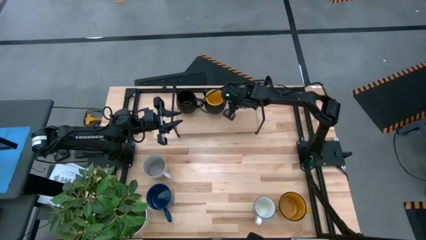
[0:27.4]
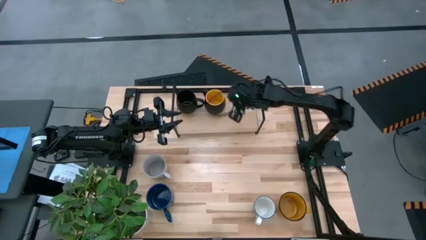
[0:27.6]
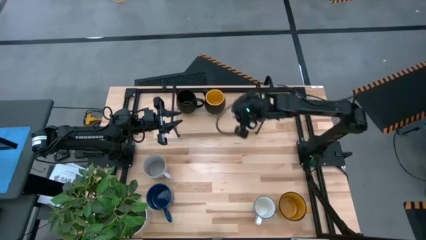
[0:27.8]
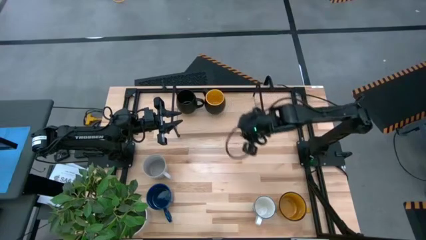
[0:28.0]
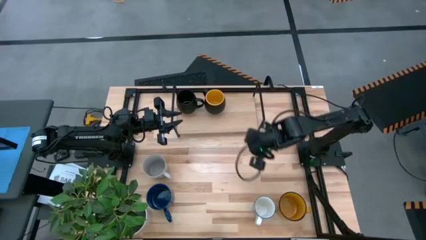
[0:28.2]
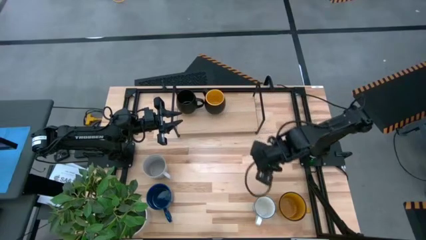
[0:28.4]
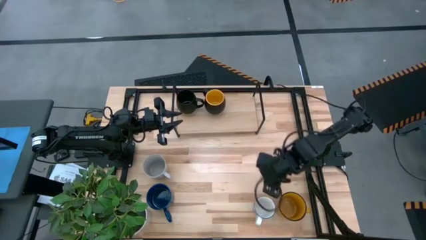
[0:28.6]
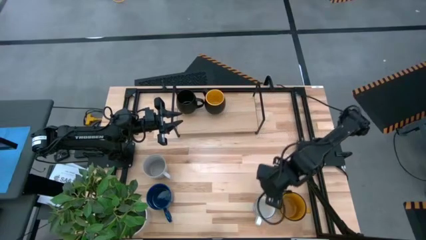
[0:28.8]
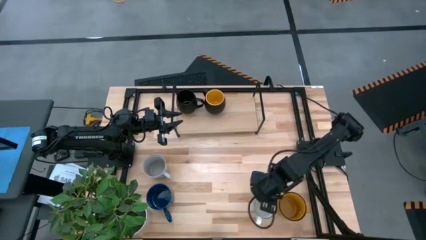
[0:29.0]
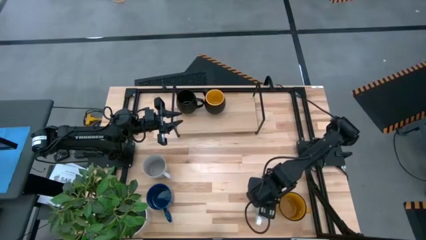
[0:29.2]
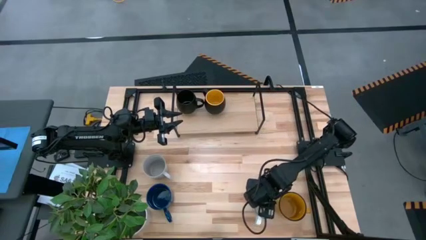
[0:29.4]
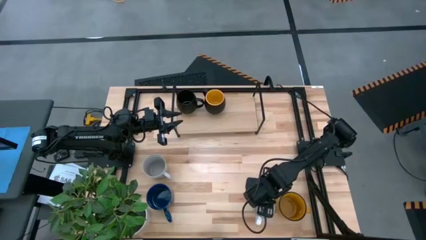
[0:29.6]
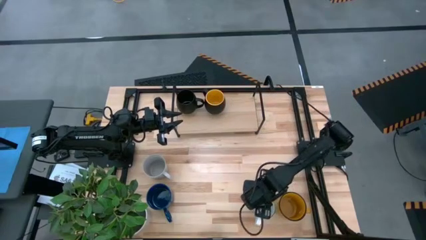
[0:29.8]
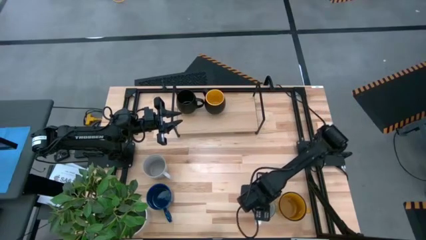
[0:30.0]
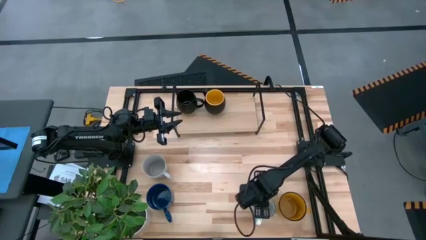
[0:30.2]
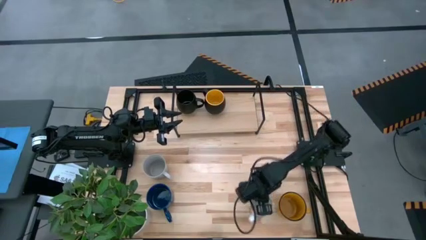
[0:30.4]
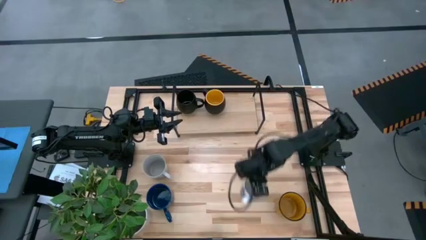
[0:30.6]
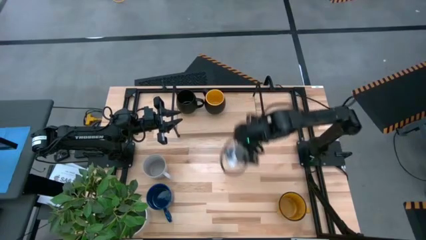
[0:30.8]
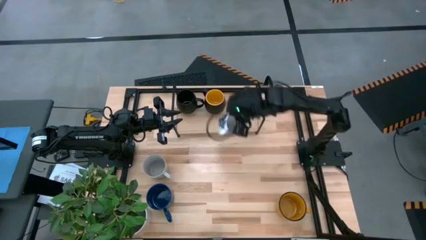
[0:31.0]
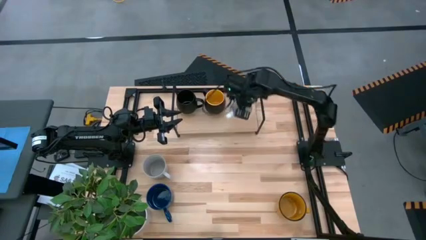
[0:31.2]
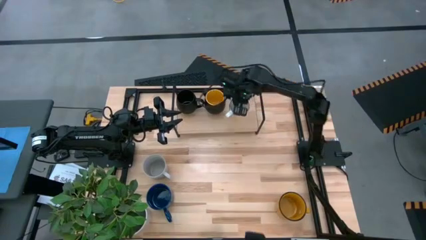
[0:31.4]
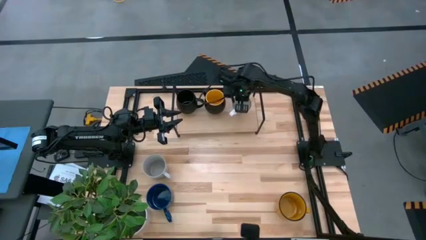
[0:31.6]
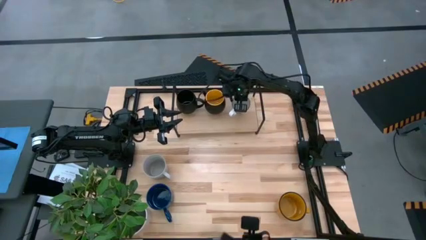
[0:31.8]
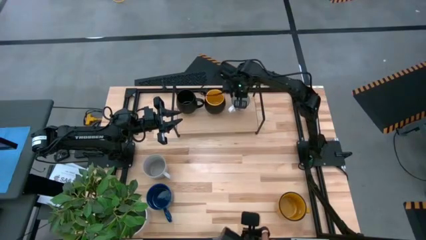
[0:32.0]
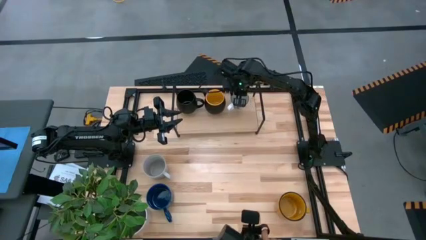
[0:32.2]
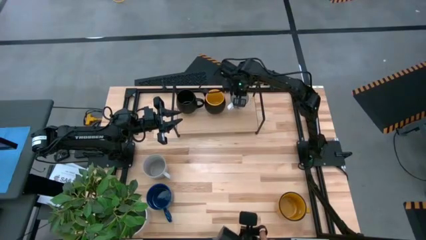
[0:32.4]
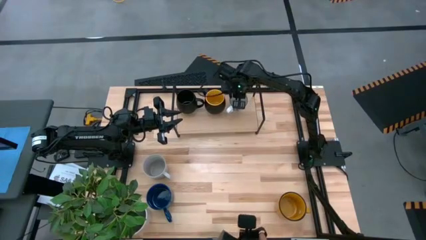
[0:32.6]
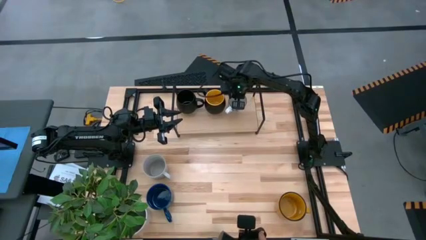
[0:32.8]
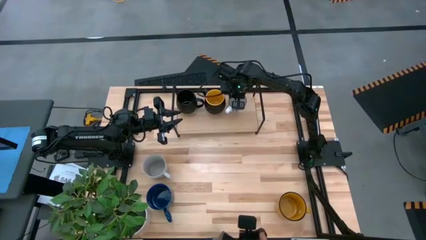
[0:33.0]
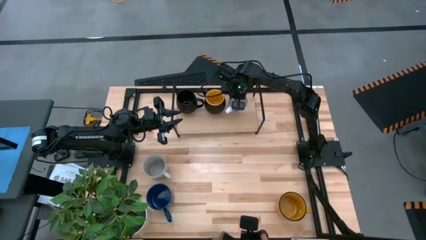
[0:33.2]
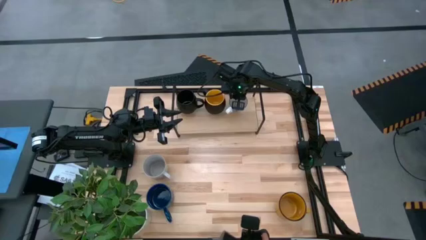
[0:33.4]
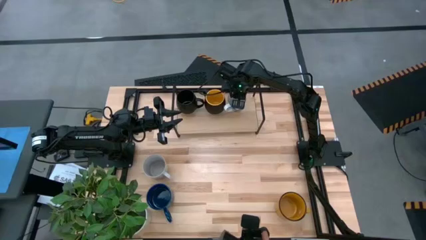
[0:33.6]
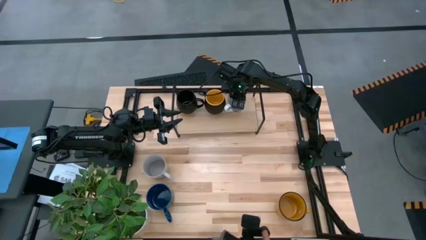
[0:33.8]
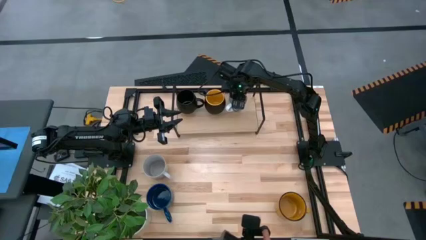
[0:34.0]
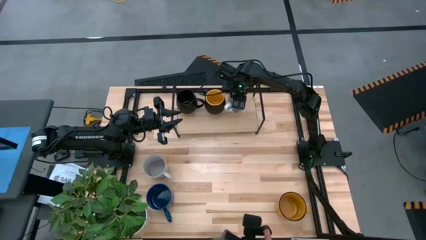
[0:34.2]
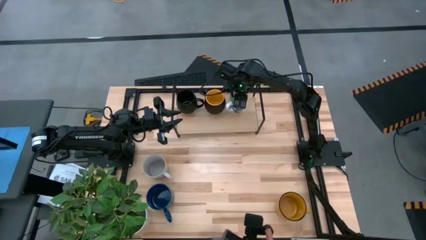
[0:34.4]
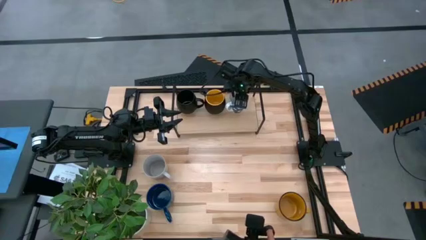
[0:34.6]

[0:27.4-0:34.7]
Task: Place coffee mugs
Put the patterned blue mug on the shelf

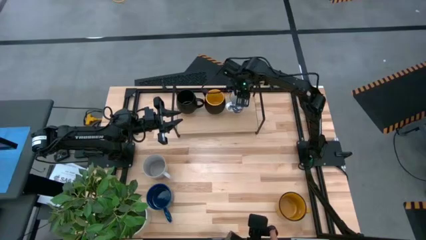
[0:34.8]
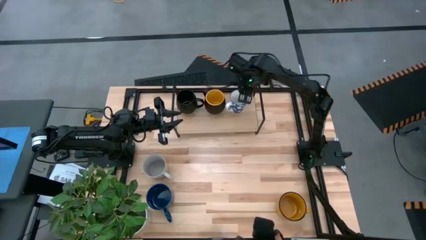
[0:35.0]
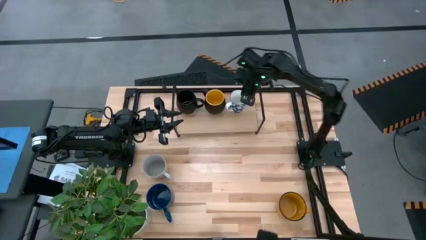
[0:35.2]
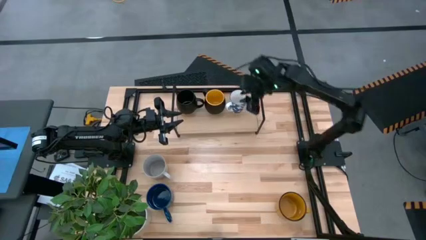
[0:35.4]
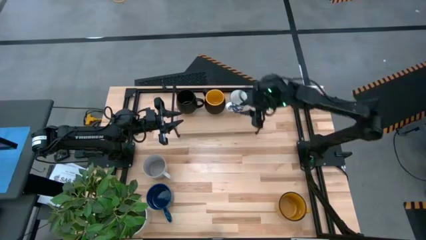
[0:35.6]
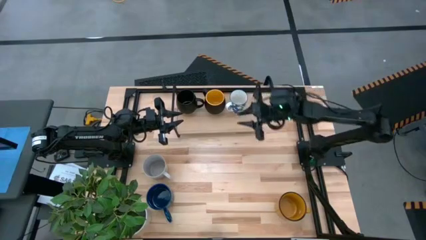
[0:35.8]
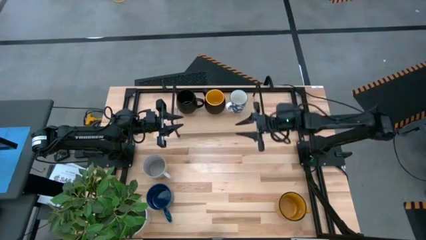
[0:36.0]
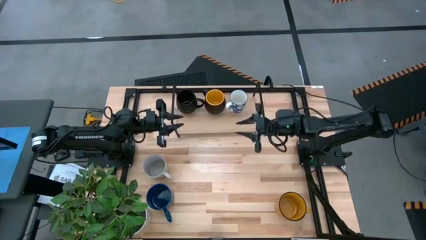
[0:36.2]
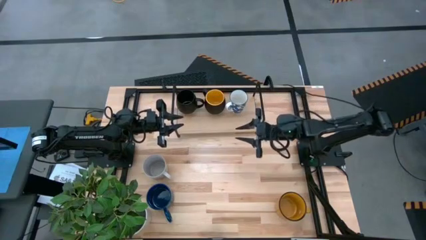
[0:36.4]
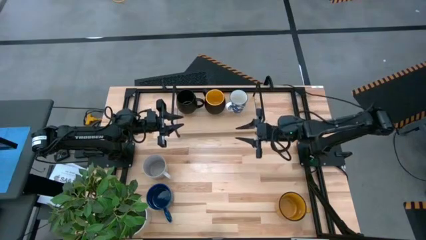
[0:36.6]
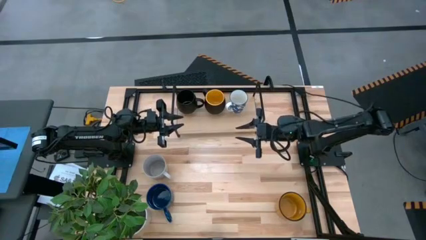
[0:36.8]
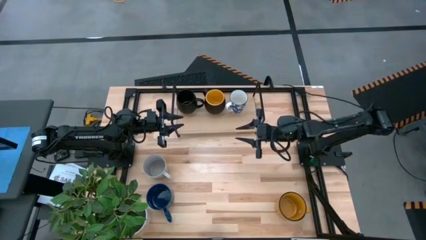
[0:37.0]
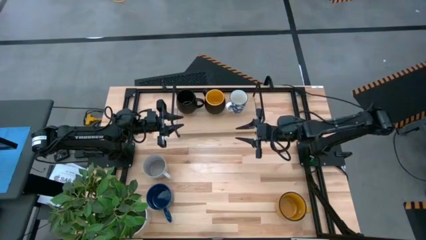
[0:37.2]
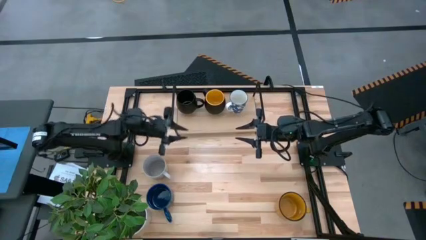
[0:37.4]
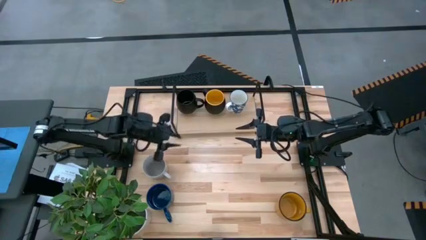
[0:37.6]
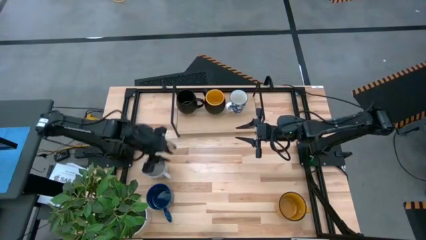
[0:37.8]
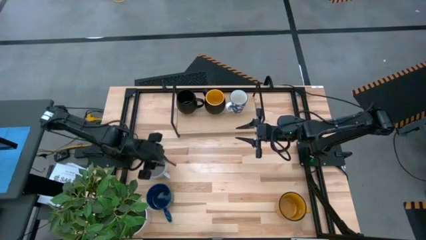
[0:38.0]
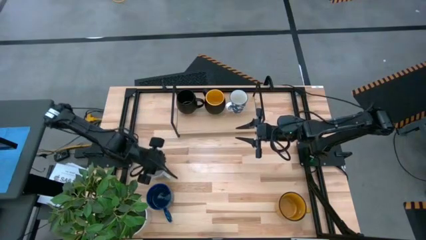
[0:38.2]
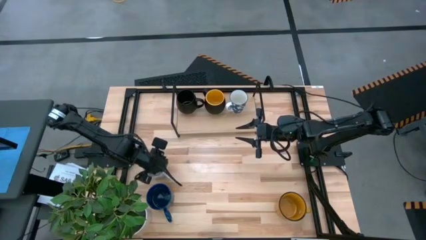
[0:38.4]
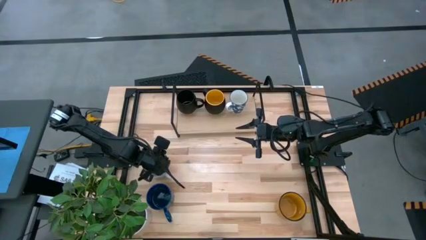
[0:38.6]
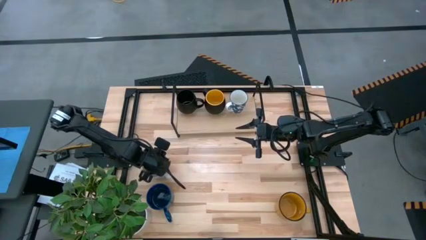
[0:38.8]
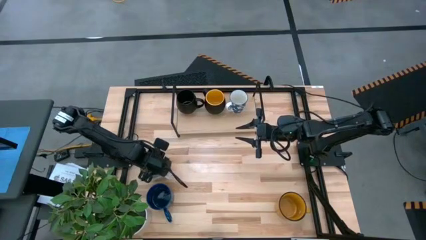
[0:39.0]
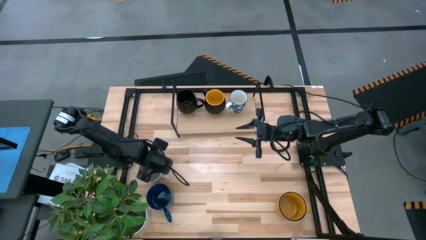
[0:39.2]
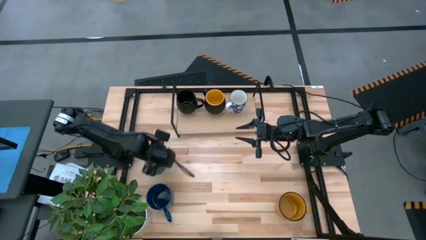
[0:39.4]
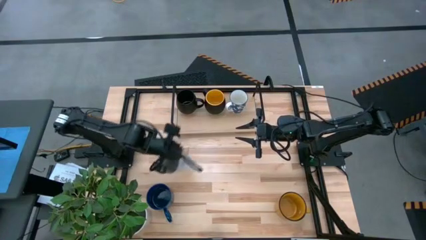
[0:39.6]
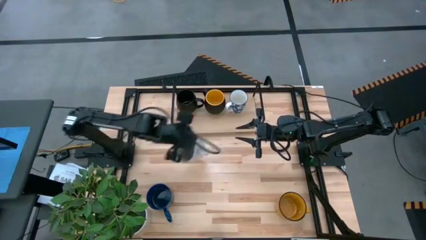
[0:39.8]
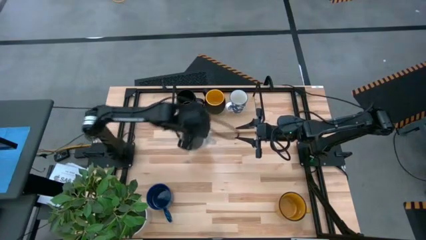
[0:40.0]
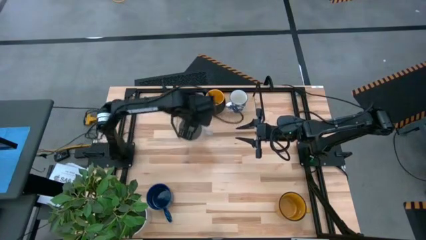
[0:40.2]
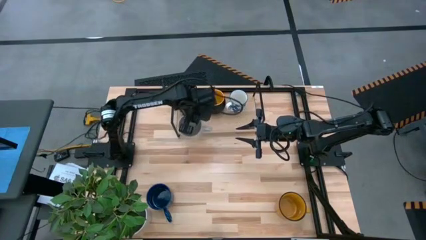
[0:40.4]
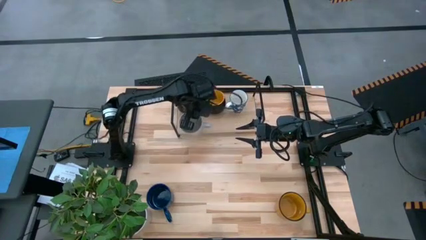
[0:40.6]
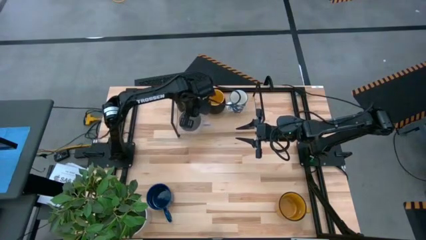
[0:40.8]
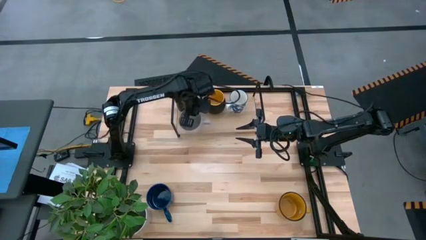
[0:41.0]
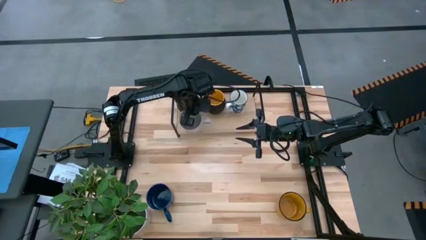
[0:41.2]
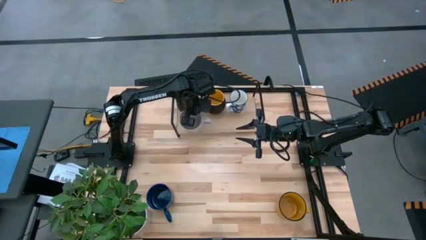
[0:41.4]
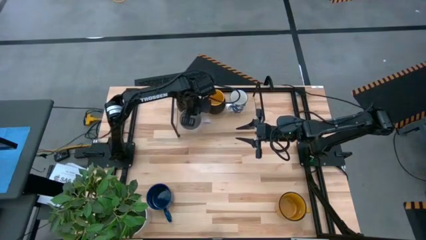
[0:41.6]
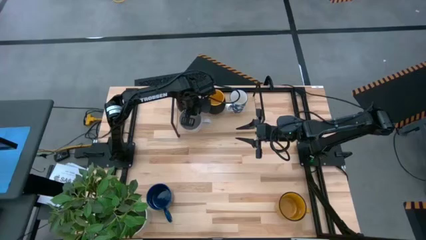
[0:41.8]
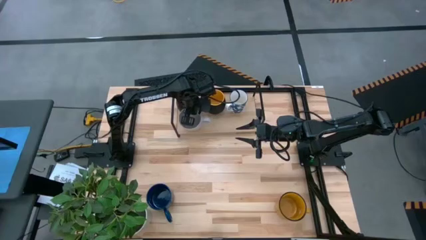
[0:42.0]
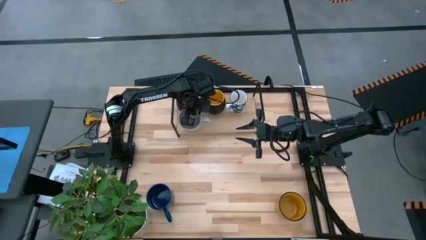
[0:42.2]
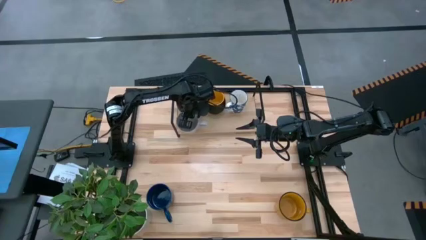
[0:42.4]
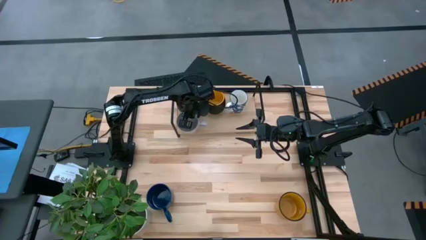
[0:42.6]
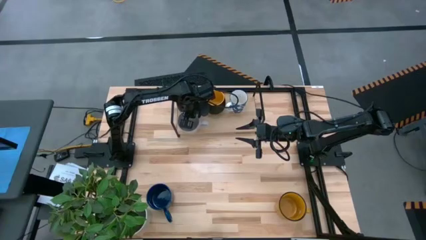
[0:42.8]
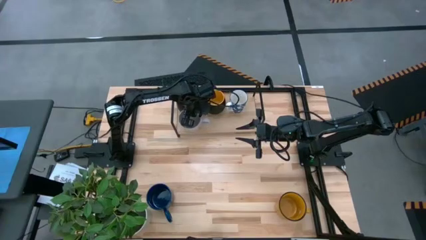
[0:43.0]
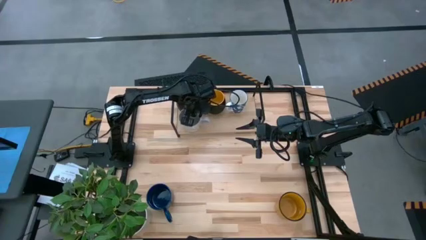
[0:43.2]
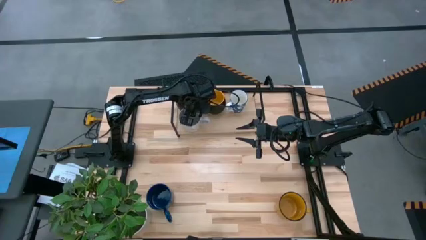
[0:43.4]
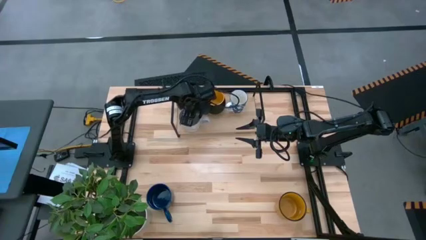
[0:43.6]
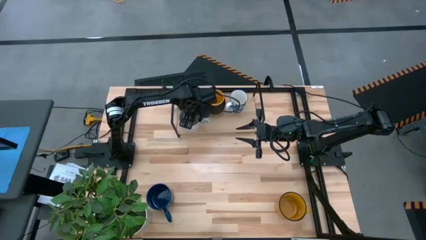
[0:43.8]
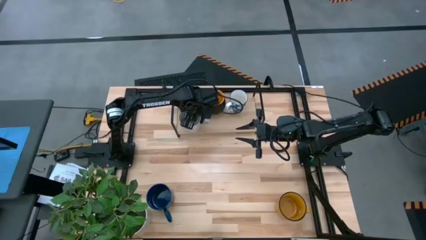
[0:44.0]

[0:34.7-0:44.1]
Put the gray mug on the shelf

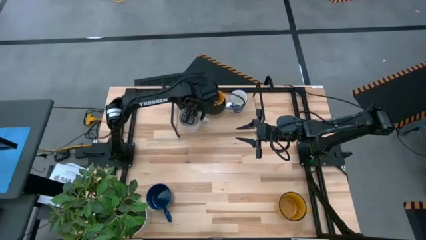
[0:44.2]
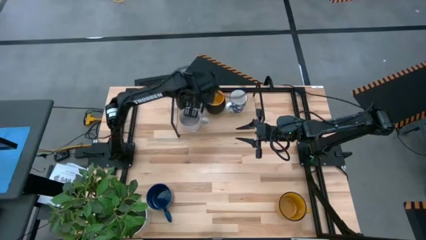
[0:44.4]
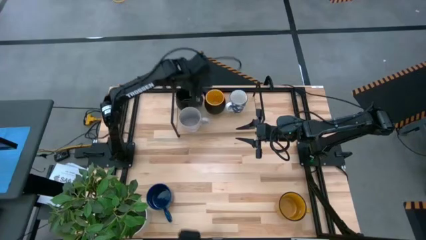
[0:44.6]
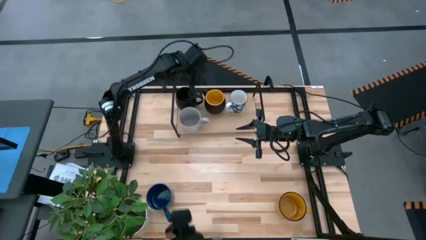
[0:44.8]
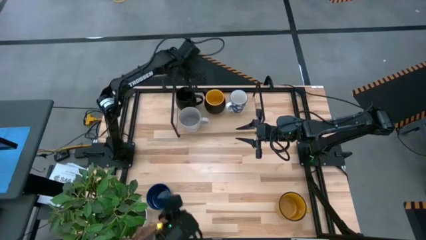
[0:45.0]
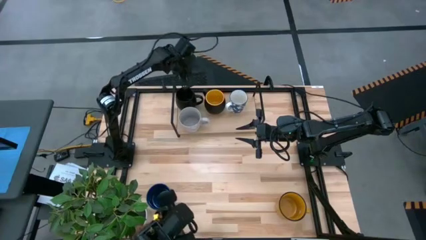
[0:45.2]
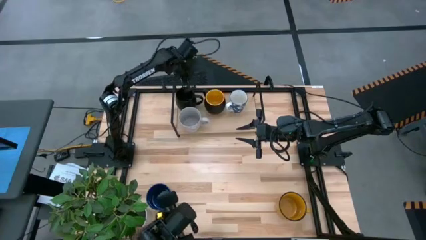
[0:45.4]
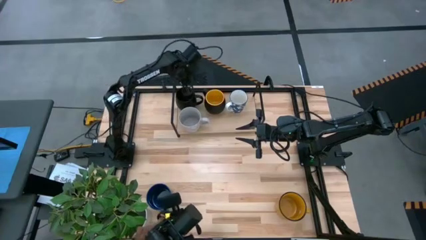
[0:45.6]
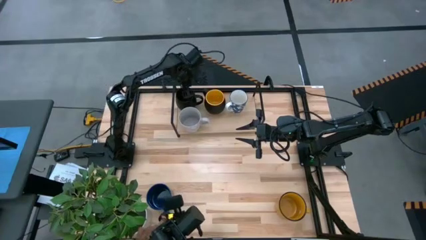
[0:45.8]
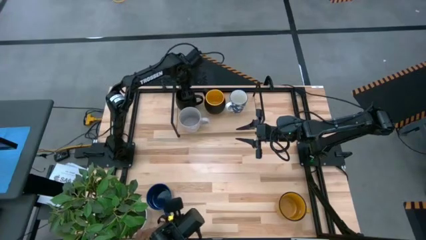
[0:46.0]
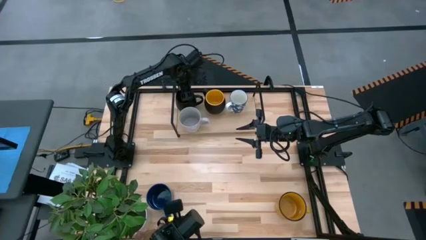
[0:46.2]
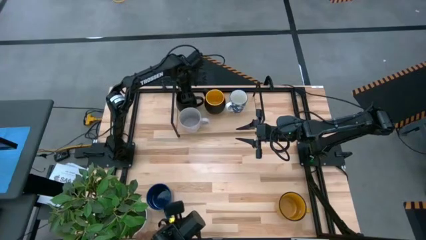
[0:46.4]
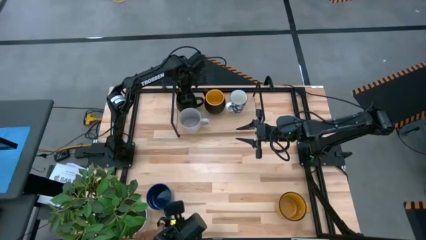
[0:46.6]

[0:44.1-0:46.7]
Adjust the black mug on the shelf
